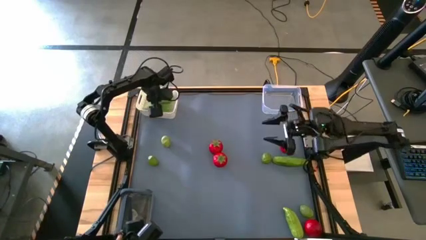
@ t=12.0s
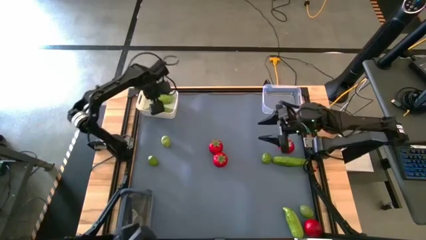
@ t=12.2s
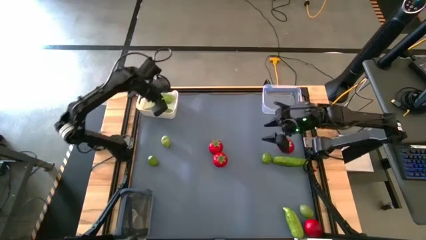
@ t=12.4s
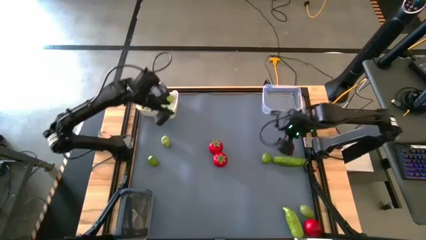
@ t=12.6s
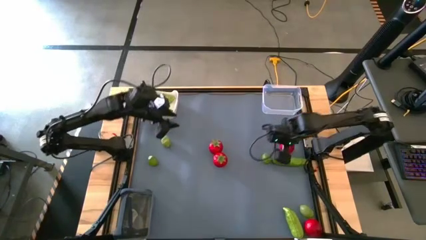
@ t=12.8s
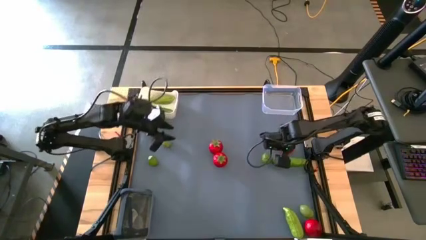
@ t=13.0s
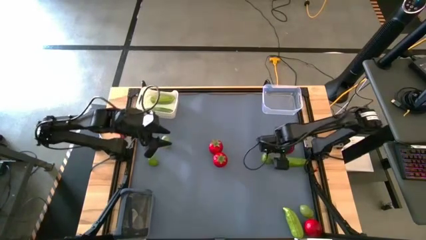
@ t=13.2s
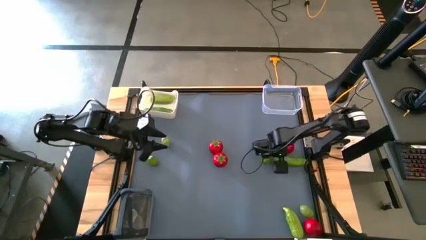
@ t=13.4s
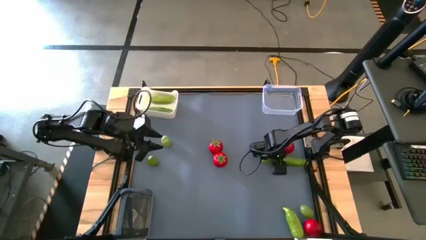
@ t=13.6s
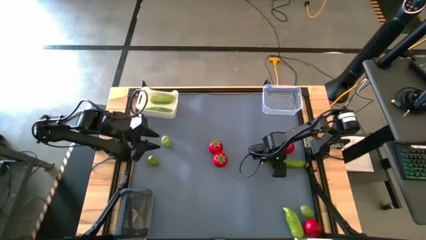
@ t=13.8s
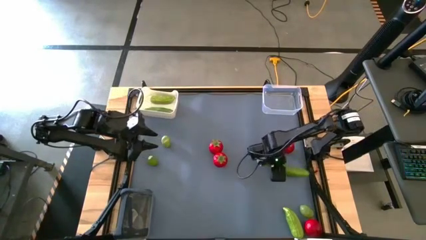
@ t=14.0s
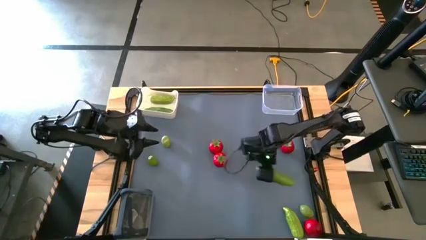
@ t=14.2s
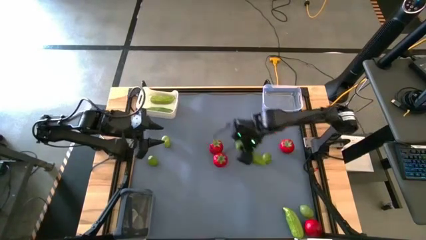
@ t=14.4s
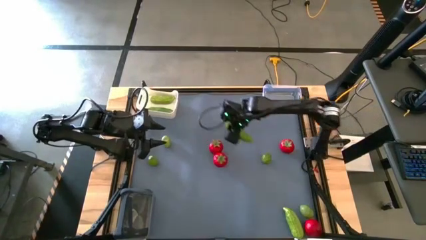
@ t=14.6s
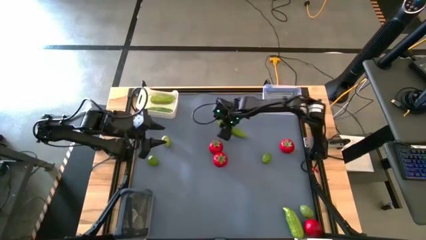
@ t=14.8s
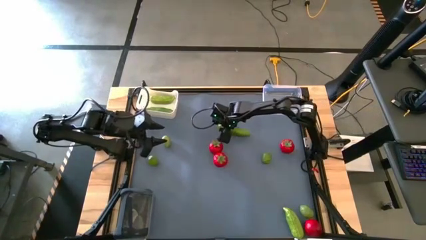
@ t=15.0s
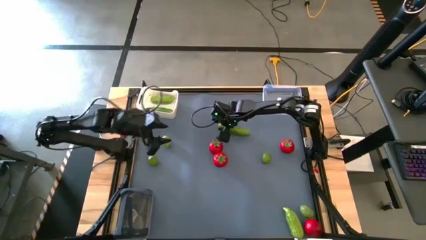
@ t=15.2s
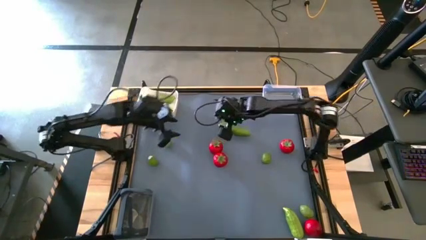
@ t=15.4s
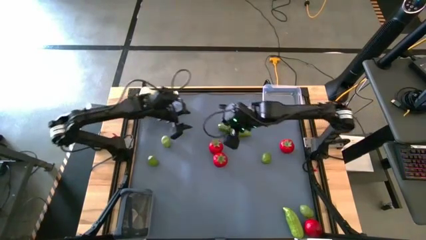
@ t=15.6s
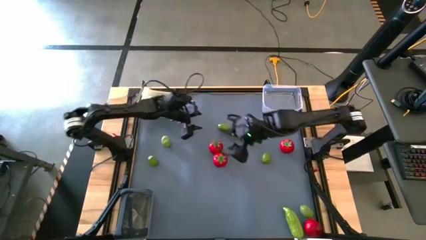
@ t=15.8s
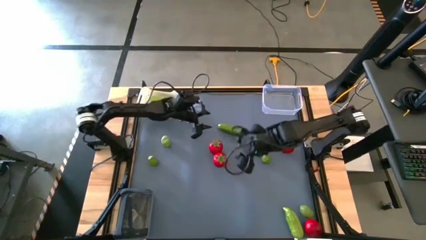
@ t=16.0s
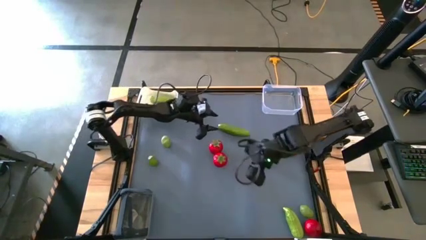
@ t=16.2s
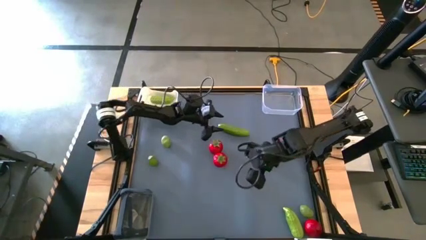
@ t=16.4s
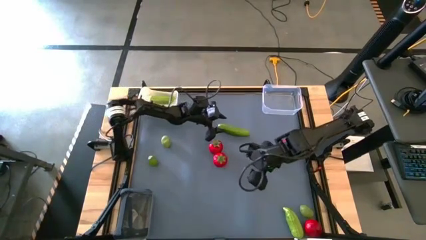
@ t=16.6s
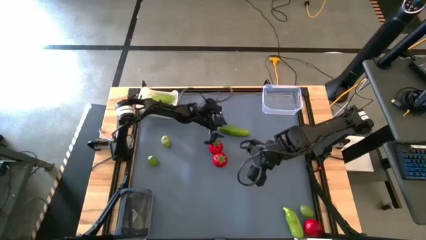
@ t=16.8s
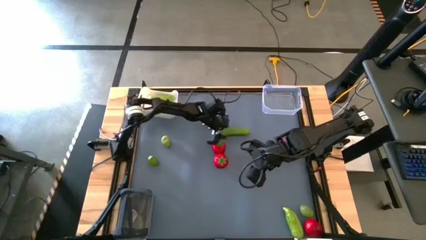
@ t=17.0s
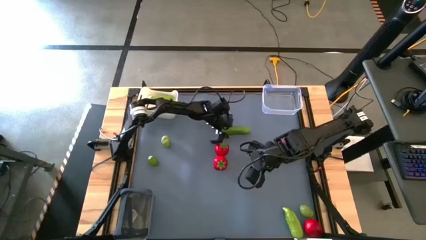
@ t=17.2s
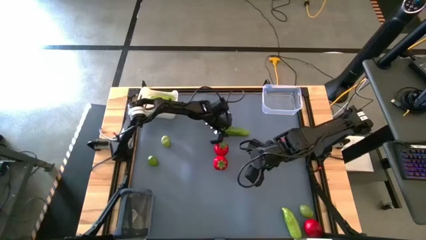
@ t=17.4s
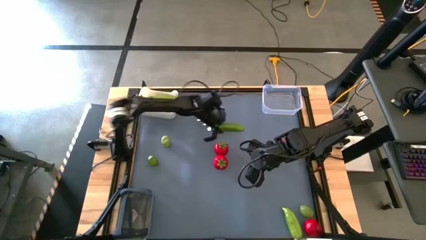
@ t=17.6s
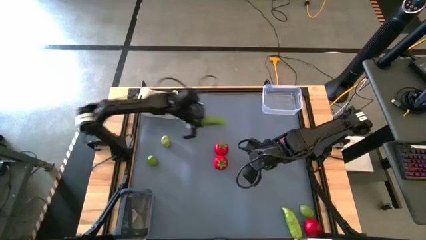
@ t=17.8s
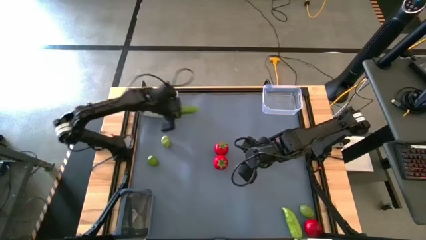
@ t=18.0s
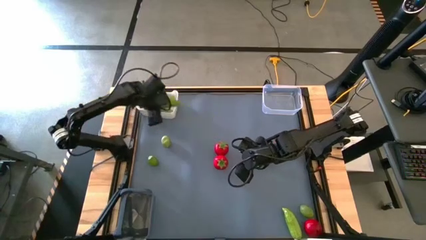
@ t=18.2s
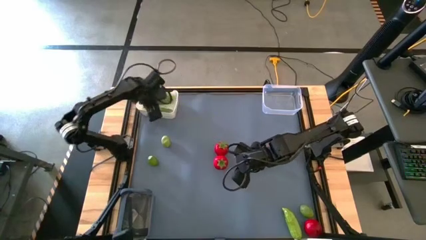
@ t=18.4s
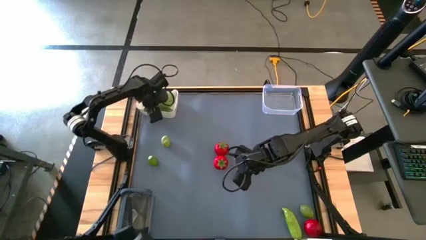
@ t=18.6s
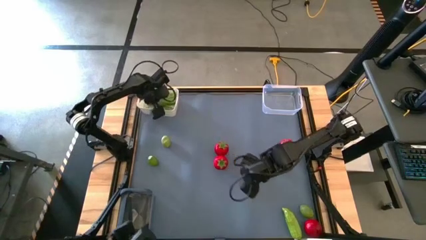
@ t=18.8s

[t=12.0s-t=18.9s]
Task: Sort produce into baskets
Put the top cucumber into the white bin

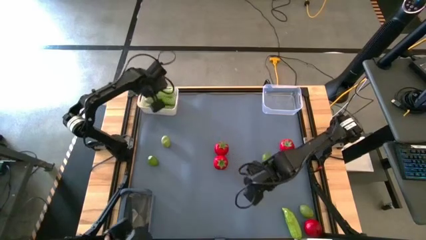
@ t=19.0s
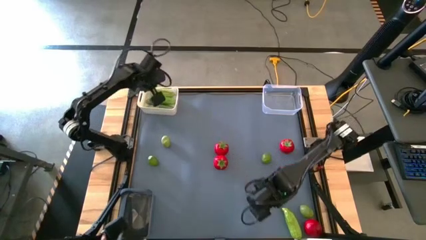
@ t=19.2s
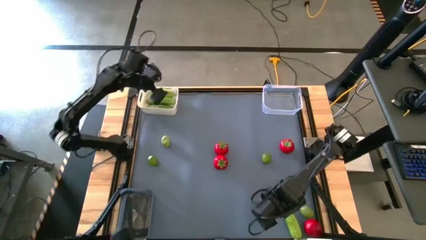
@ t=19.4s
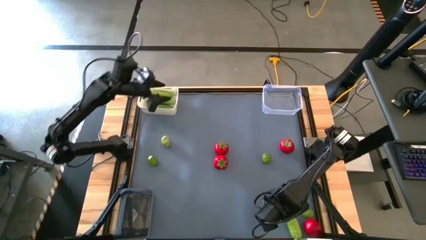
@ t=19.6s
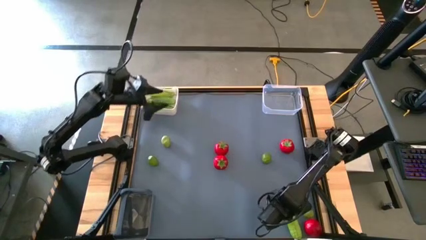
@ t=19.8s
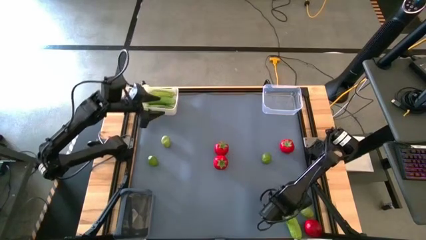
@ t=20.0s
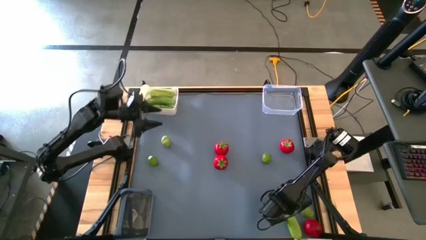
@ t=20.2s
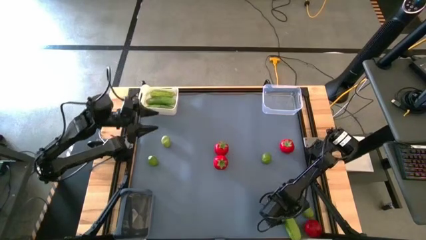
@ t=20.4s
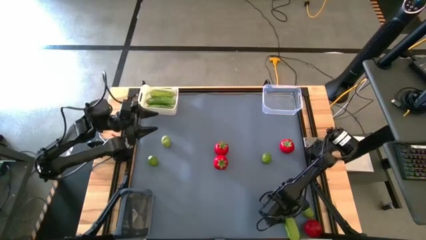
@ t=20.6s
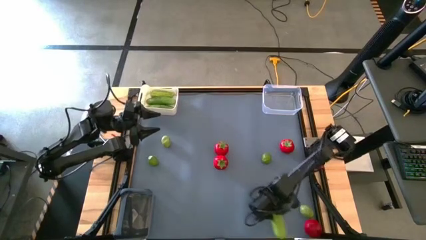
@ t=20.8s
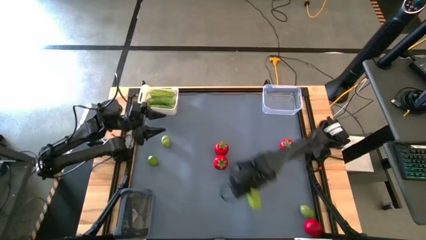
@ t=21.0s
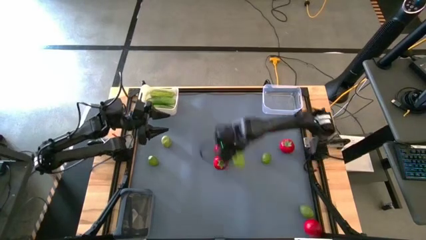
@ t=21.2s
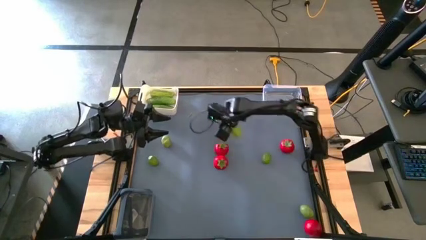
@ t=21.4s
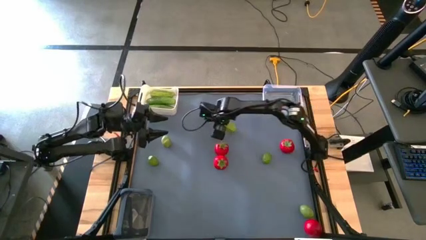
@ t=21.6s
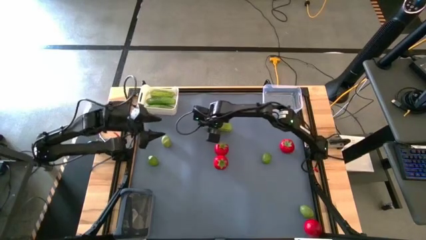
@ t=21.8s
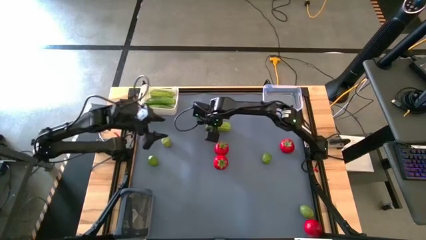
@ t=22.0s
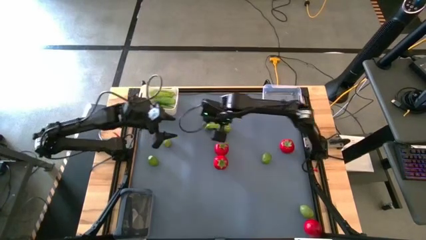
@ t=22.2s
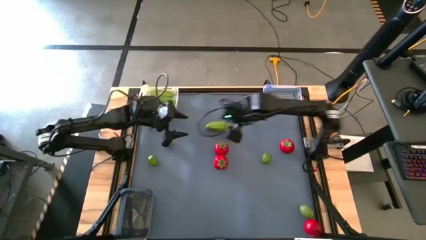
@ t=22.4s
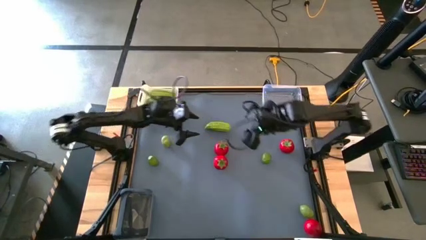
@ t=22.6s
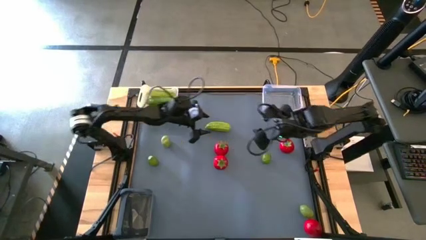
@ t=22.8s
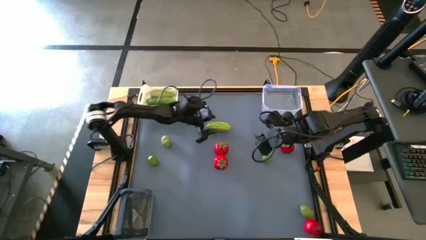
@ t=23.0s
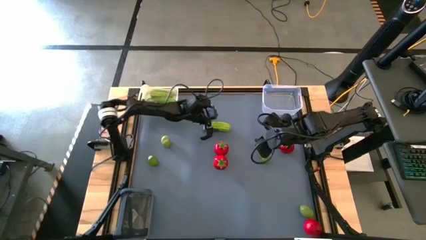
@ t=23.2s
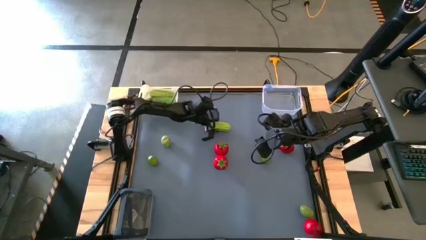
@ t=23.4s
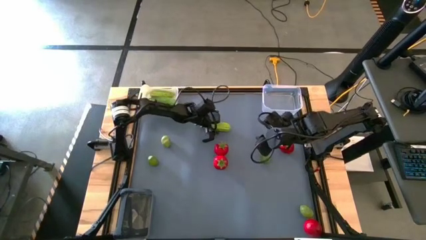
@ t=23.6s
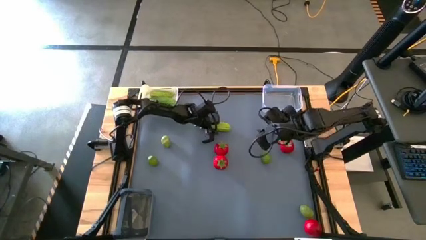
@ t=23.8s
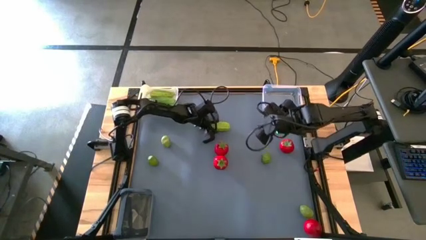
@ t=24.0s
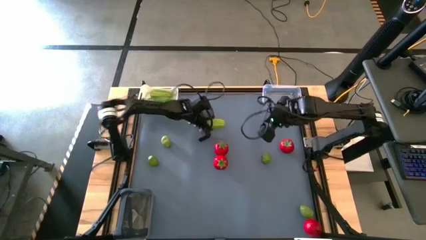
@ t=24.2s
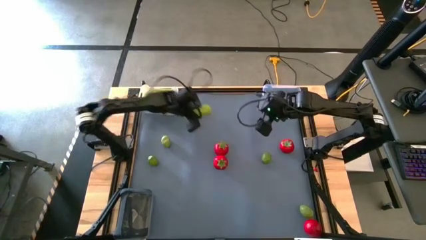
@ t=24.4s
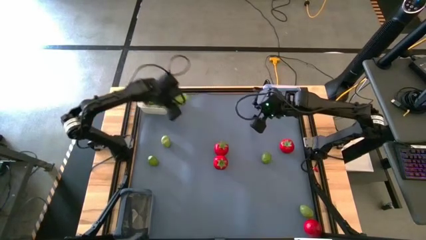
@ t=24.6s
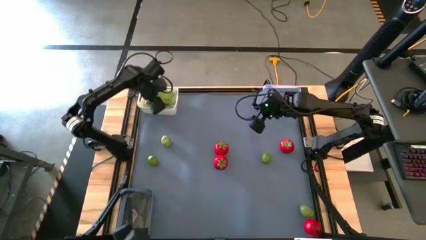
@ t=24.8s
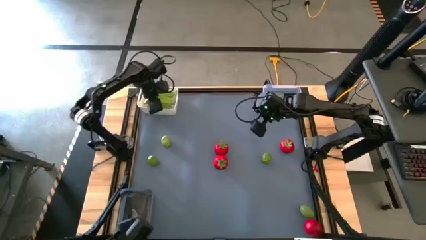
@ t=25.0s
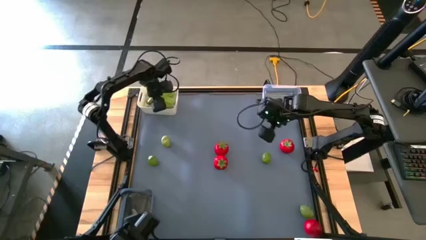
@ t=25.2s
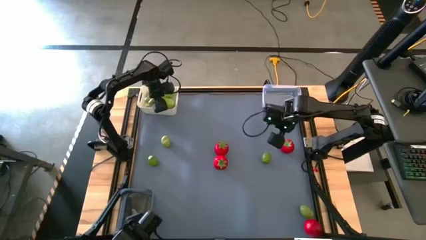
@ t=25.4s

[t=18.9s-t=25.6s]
Put the cucumber into the white bin

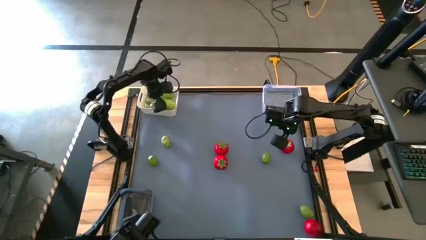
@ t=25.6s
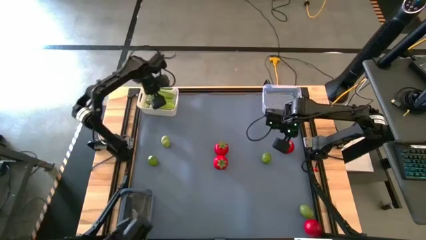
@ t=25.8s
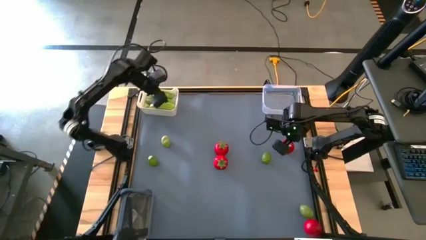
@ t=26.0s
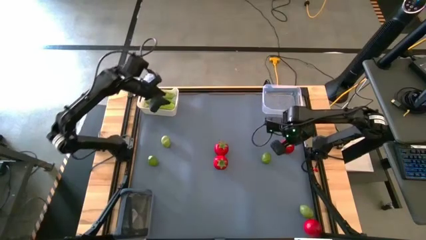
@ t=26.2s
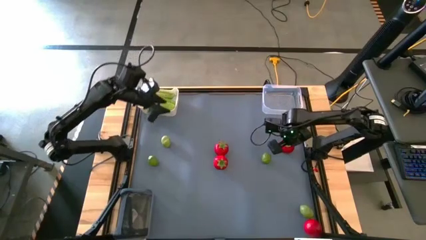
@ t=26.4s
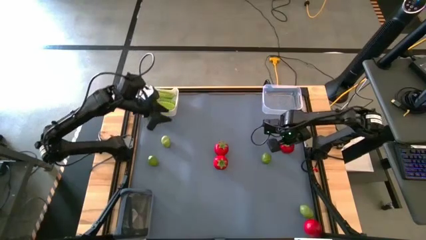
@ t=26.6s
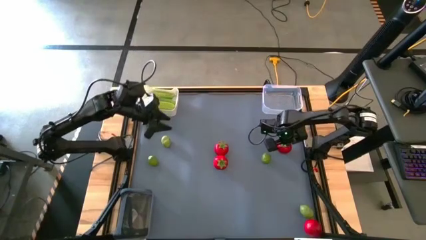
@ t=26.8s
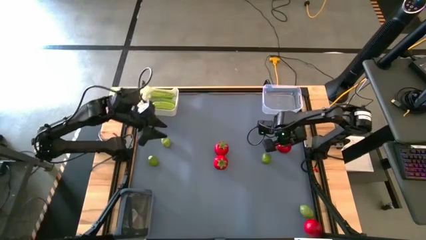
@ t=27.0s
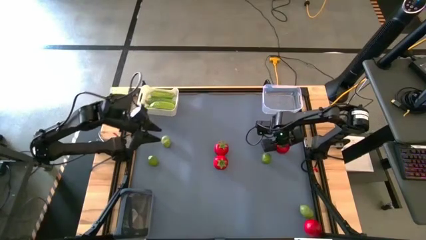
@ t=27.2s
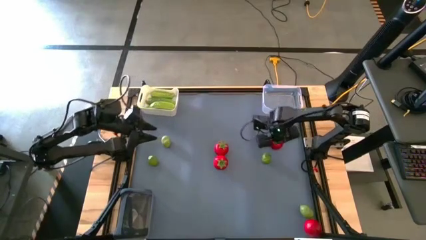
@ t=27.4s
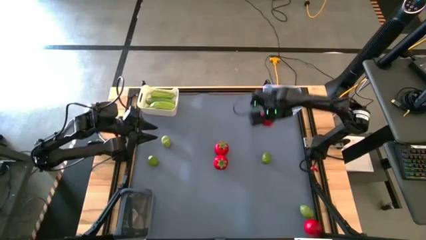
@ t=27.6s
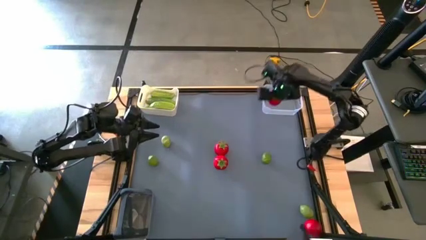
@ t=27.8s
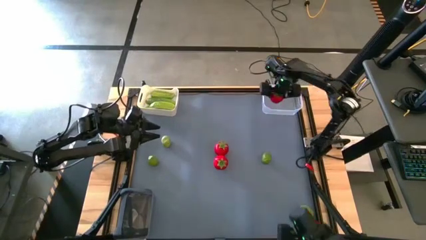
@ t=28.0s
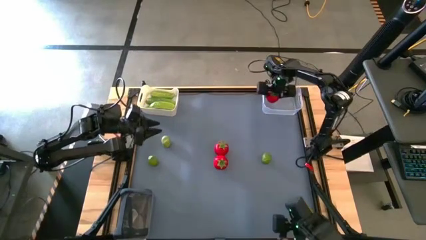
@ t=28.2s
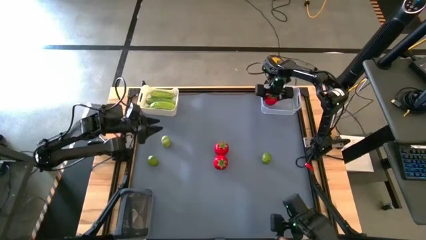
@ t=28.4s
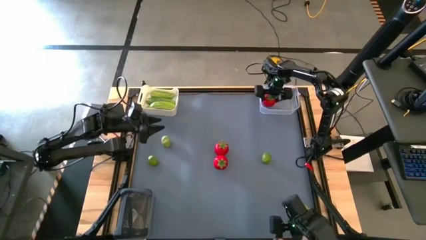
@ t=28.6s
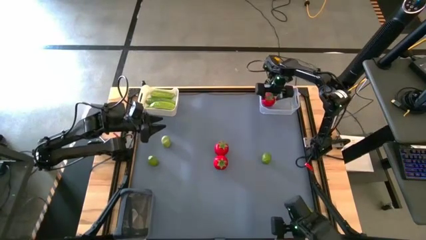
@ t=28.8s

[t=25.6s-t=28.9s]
Put the top right tomato into the transparent bin
